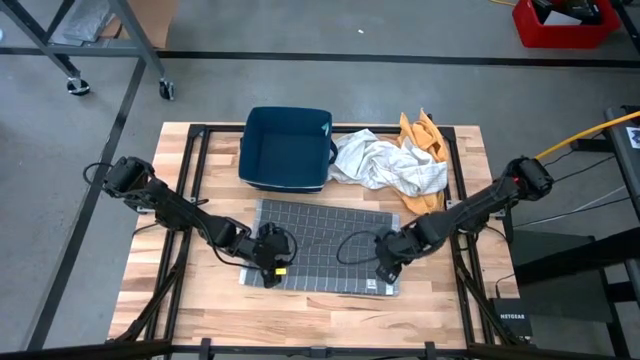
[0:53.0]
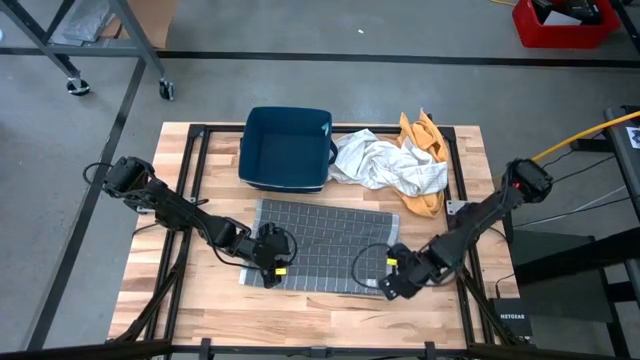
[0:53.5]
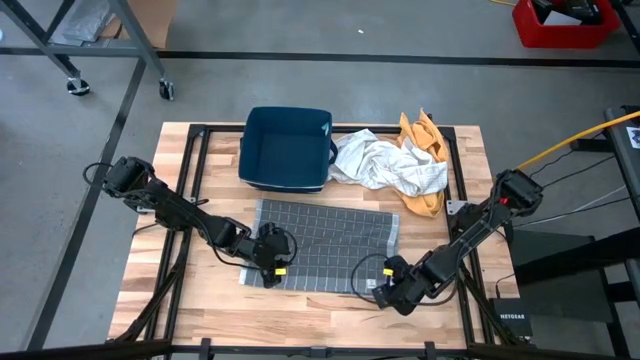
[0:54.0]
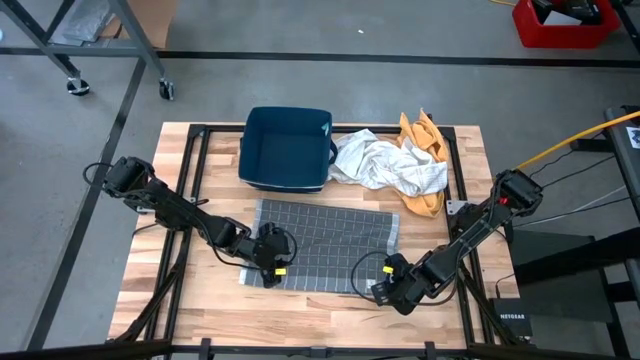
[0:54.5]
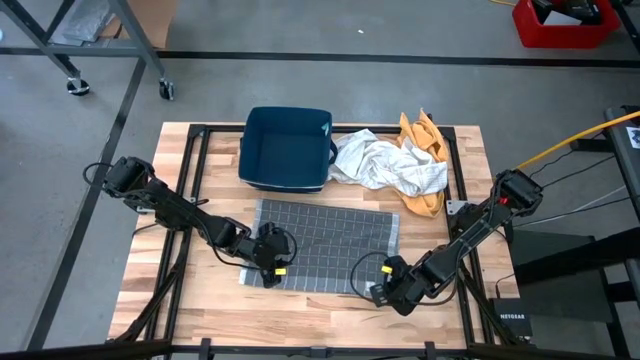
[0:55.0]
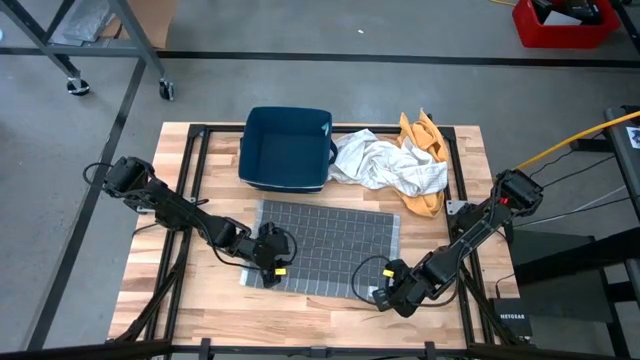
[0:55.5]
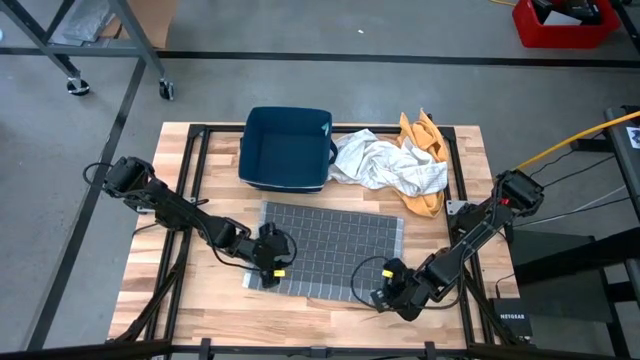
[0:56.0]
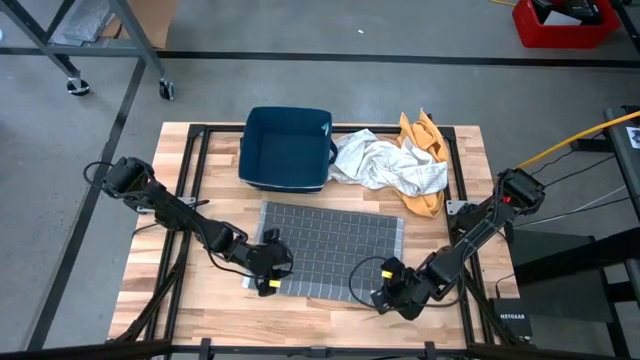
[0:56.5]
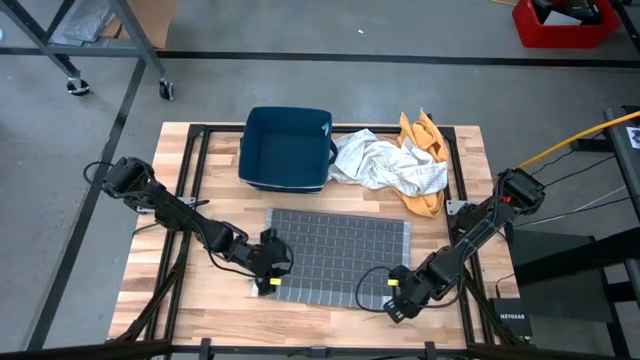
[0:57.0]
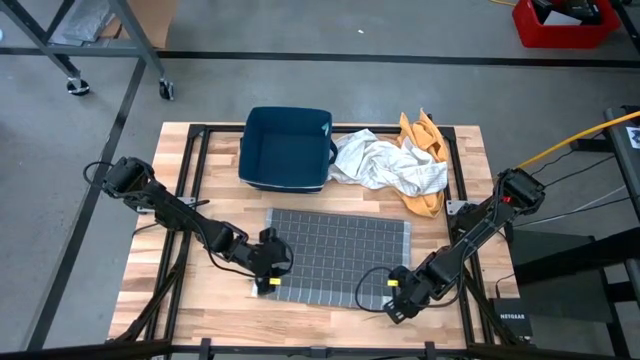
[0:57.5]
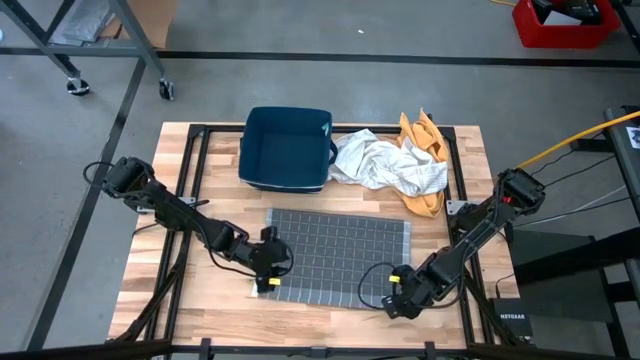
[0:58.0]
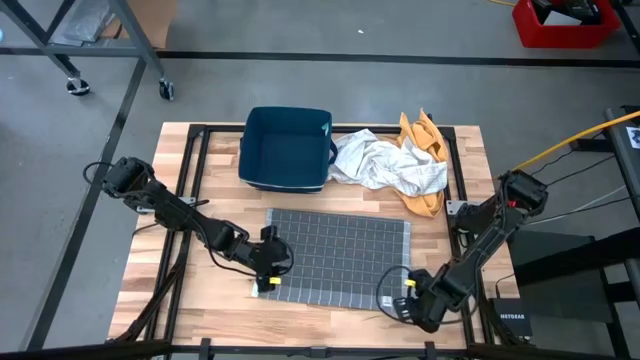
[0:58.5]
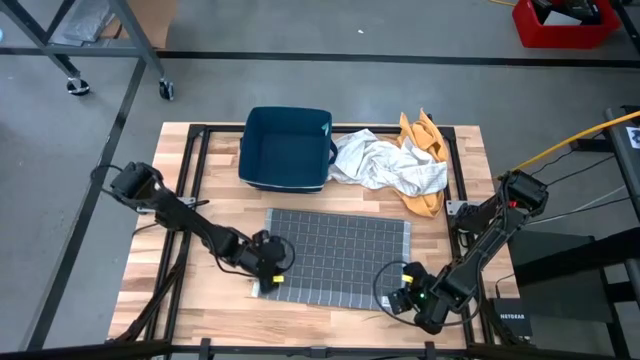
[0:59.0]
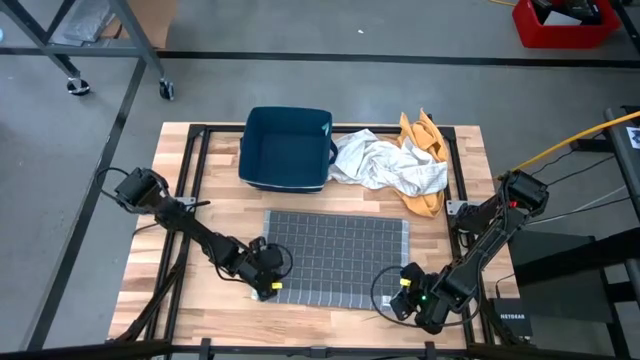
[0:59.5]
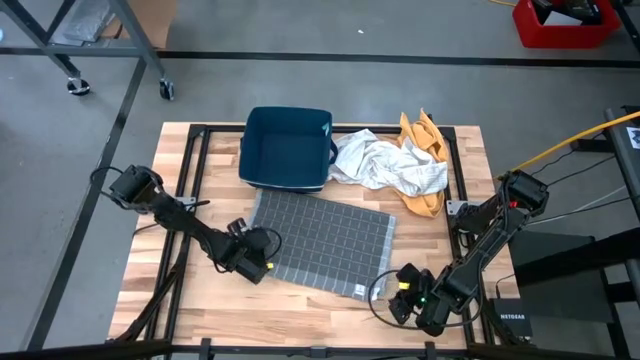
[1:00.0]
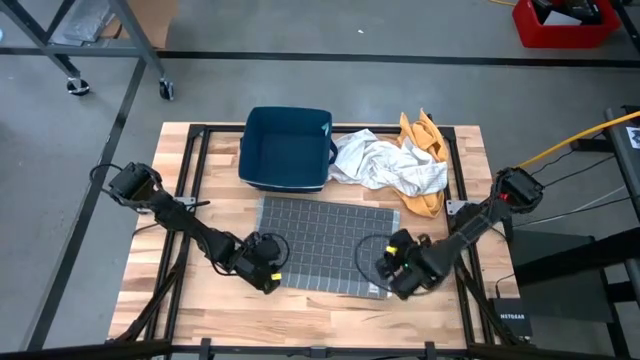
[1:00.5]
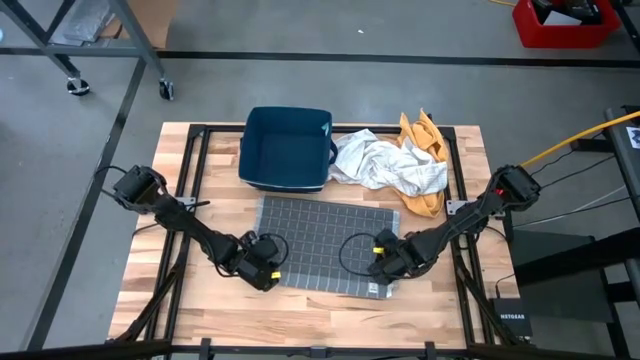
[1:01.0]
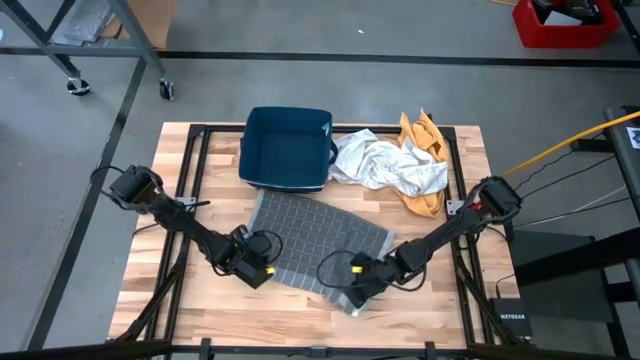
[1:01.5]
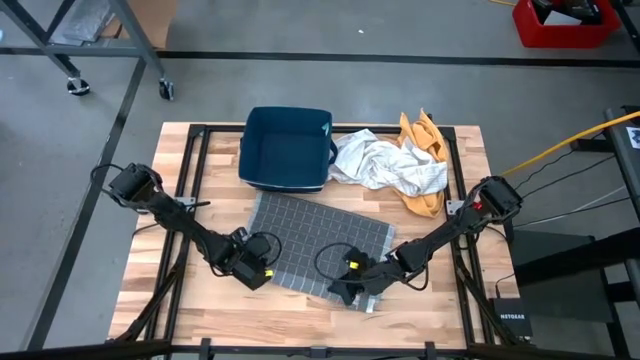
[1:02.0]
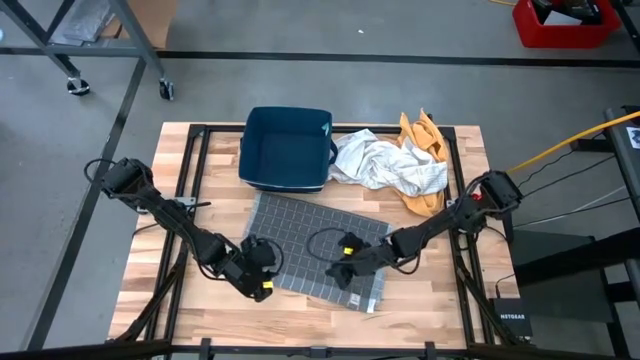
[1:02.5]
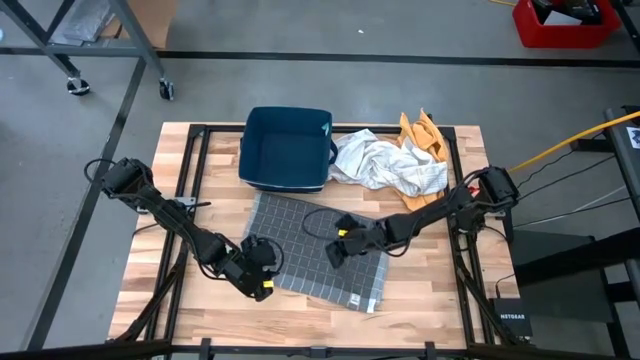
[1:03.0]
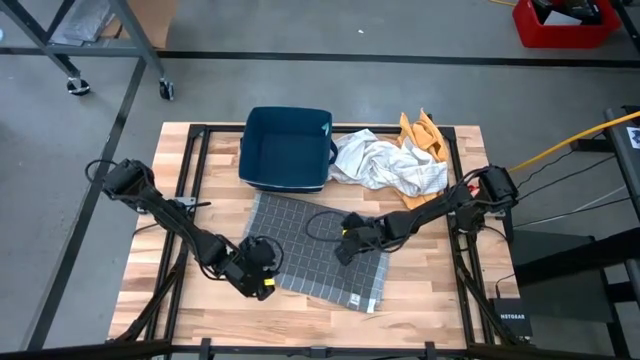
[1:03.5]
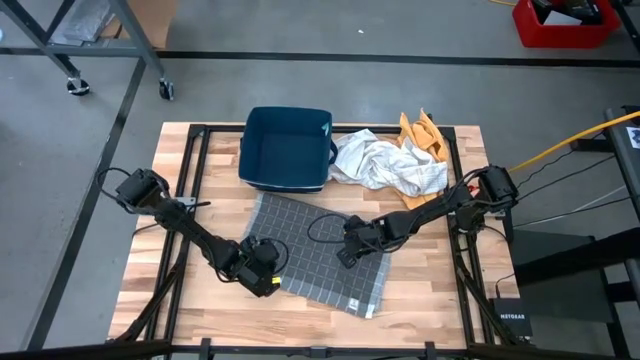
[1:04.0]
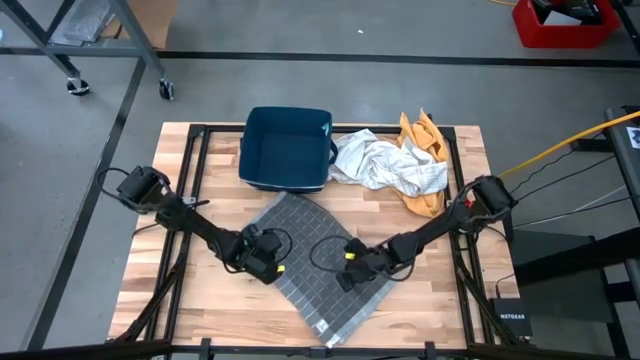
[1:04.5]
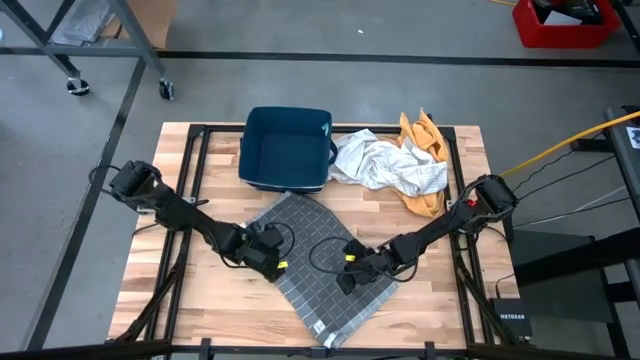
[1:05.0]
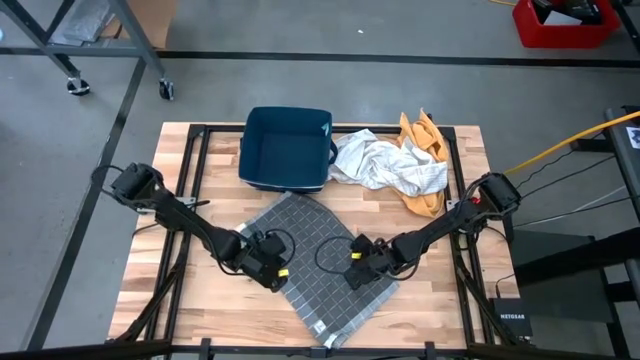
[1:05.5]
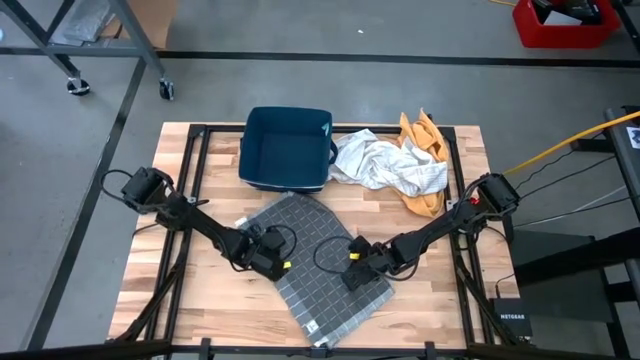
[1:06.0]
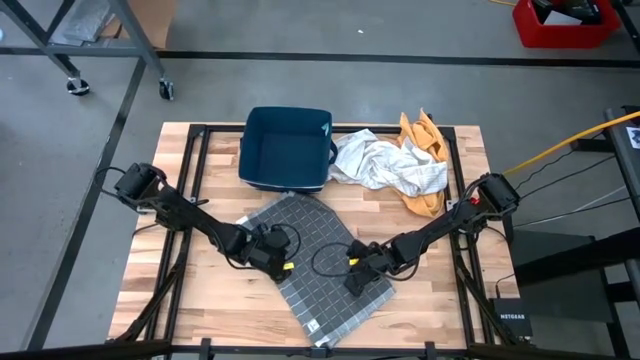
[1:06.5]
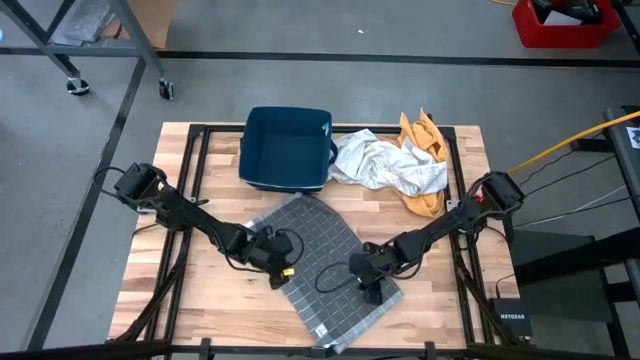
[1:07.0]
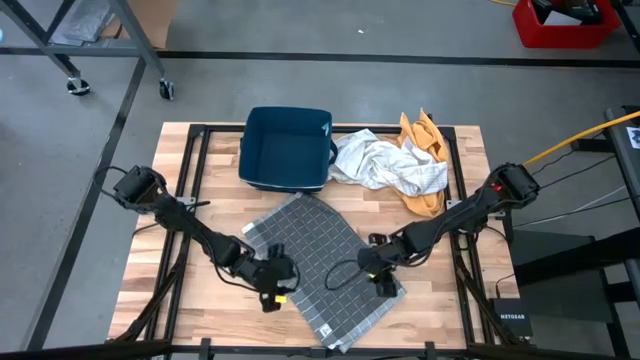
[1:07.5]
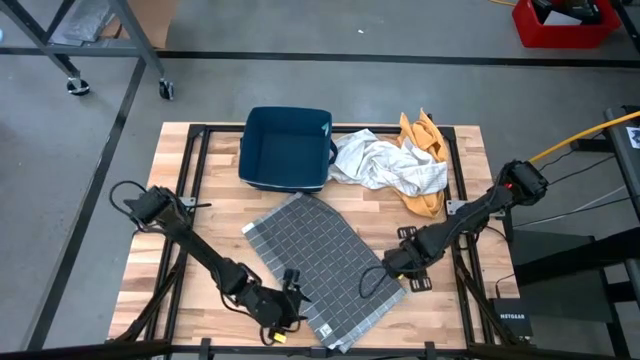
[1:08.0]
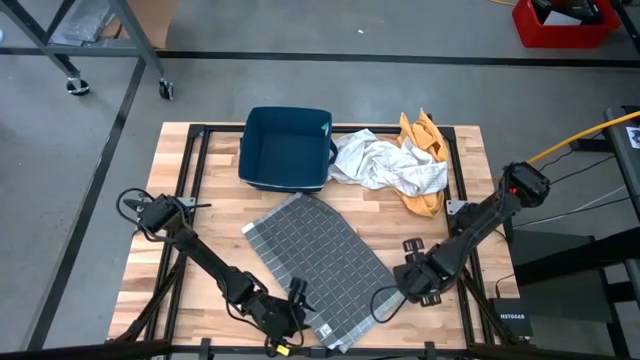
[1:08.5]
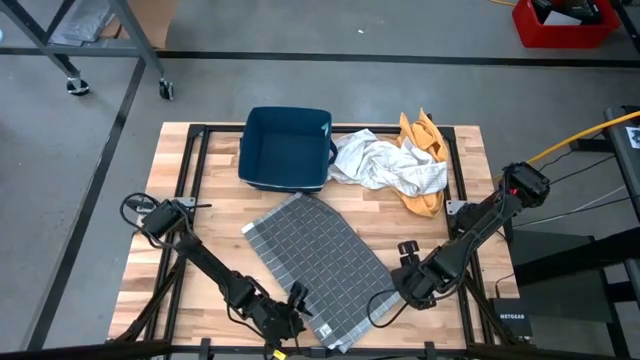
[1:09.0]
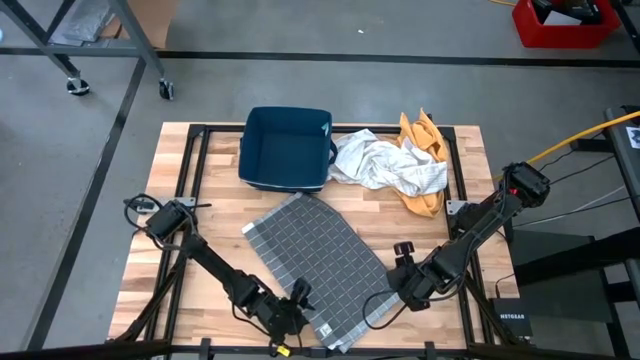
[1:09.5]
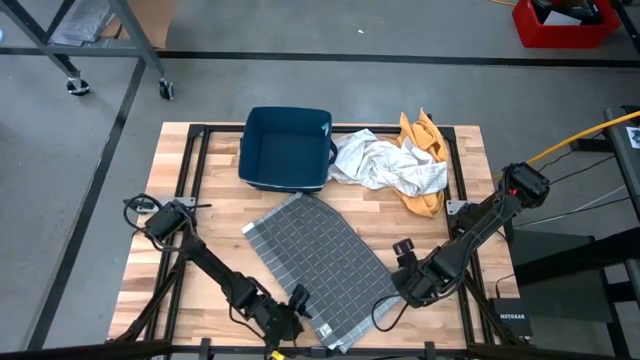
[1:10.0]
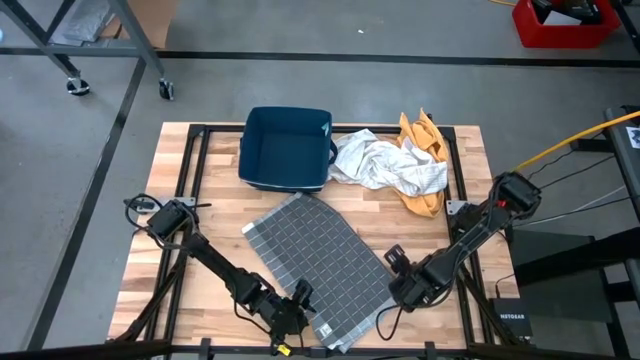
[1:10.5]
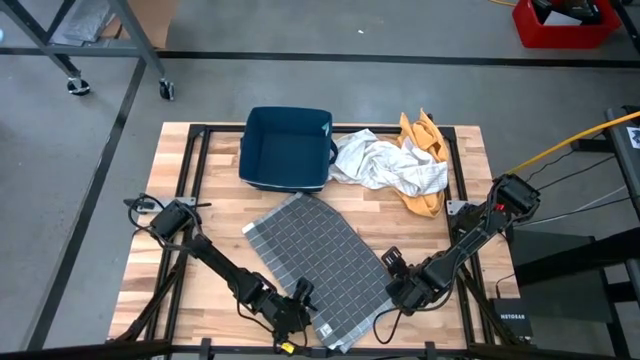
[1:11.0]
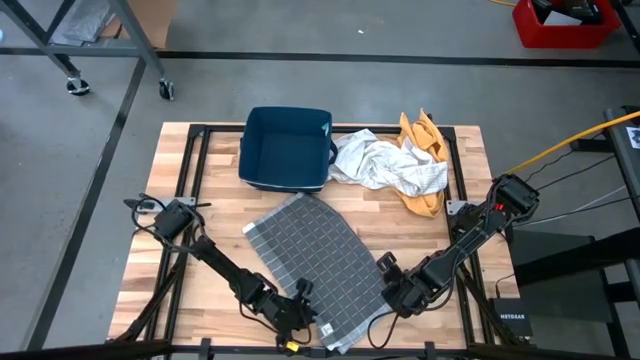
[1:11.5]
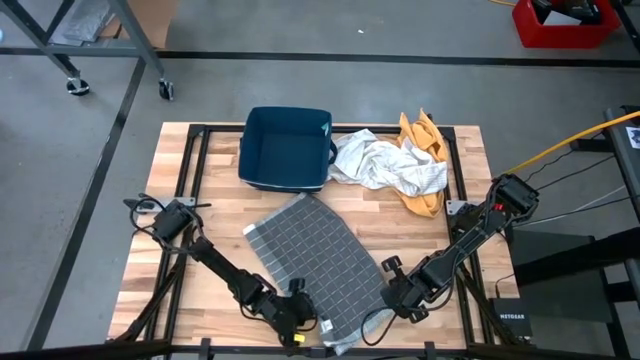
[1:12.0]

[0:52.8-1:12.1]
Task: Fold towel
Fold the gray patterned towel
